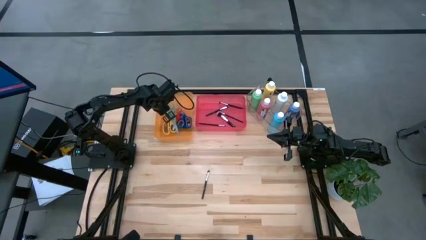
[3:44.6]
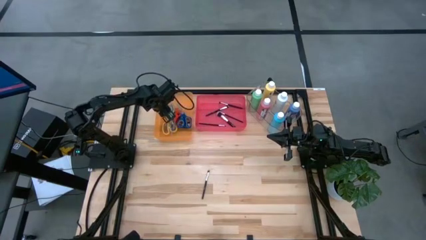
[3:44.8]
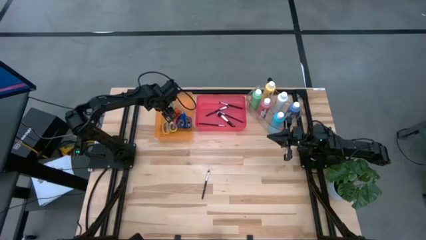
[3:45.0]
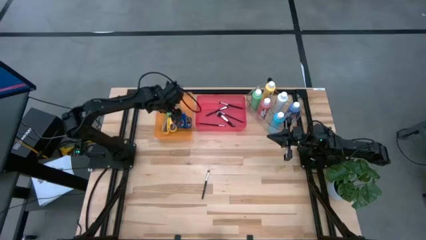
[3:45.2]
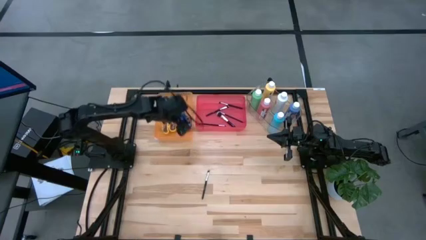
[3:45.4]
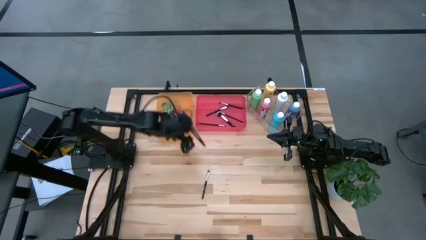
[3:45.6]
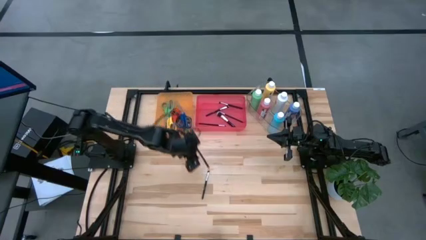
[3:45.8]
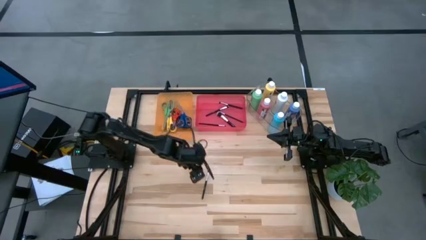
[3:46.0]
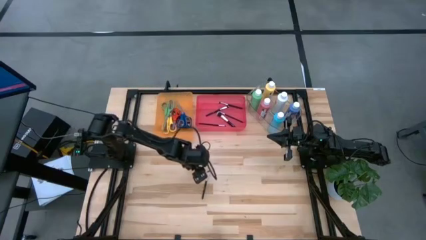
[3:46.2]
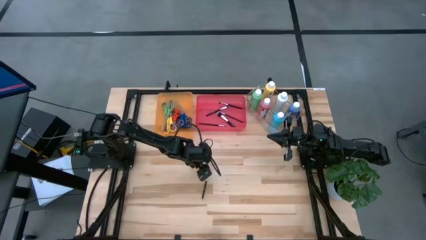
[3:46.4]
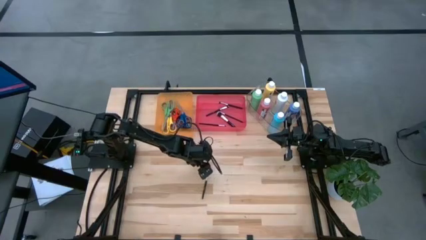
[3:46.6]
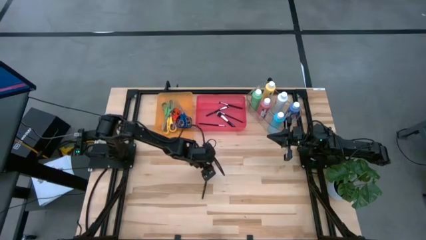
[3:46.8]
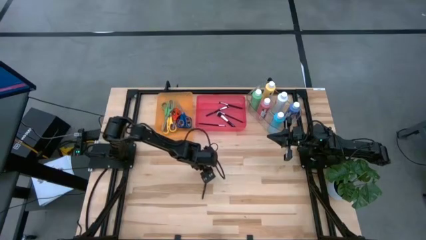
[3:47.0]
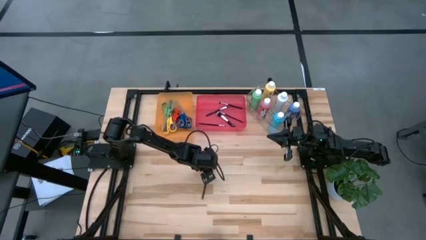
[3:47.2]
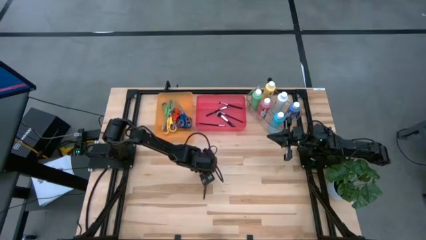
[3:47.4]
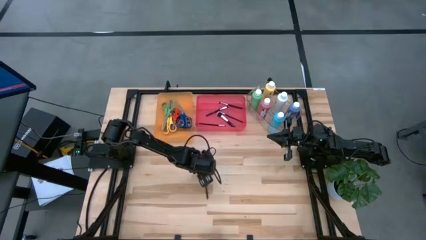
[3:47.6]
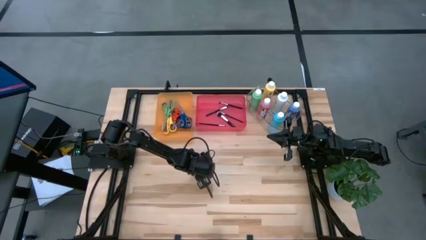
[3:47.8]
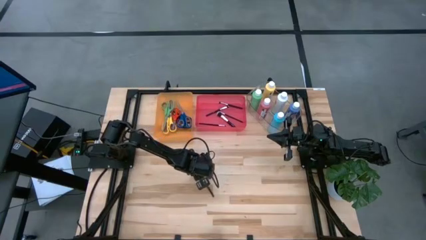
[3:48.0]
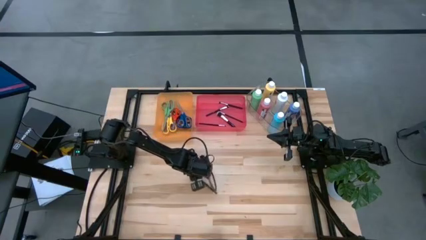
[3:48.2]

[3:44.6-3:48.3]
Task: Pick & Place Paint Supplies
Put the black paintbrush into the pink bin

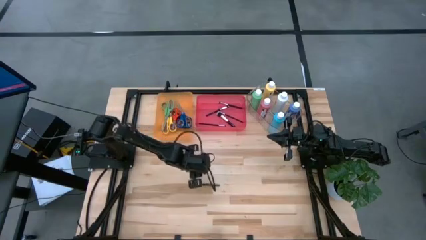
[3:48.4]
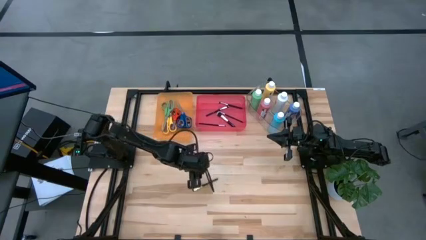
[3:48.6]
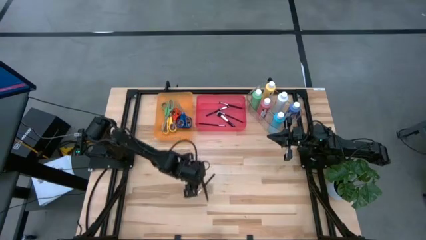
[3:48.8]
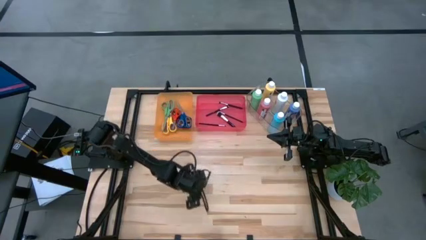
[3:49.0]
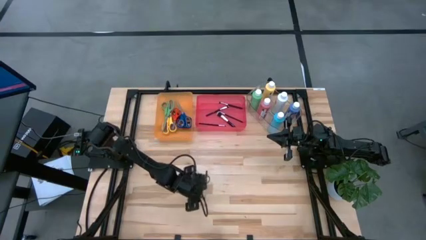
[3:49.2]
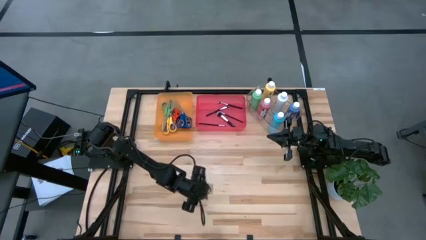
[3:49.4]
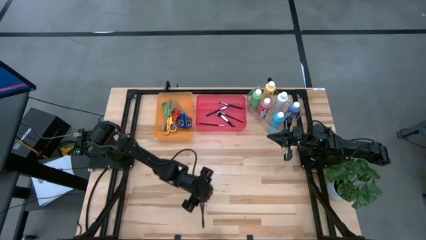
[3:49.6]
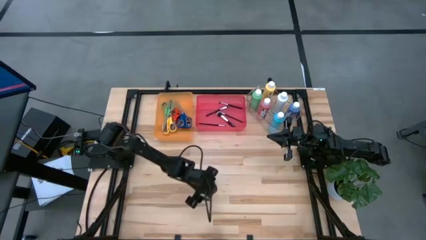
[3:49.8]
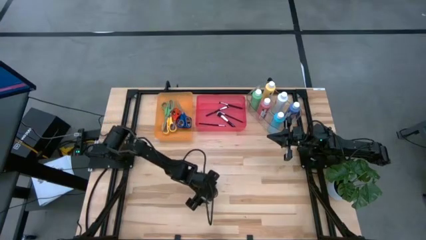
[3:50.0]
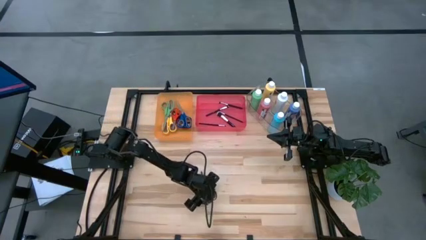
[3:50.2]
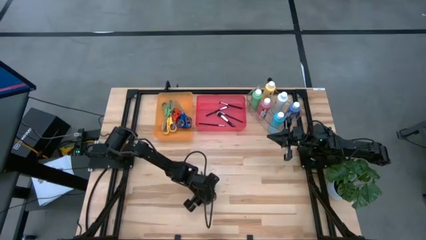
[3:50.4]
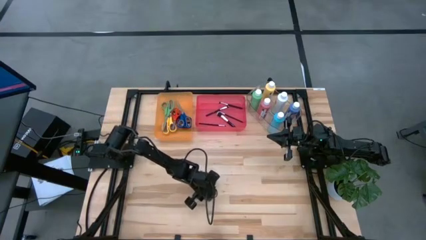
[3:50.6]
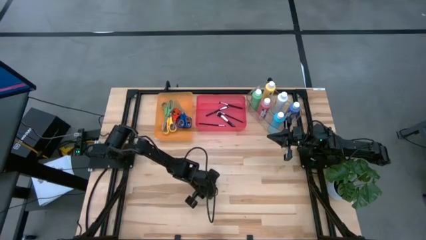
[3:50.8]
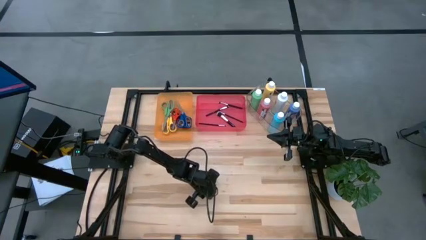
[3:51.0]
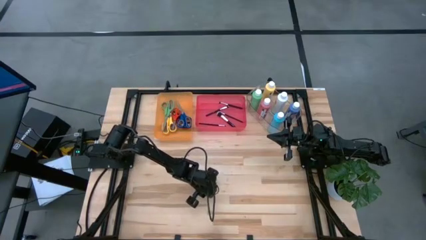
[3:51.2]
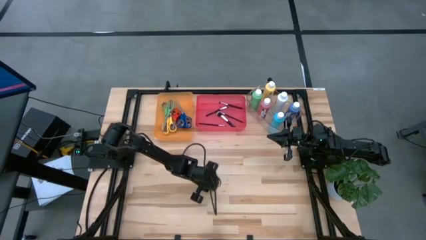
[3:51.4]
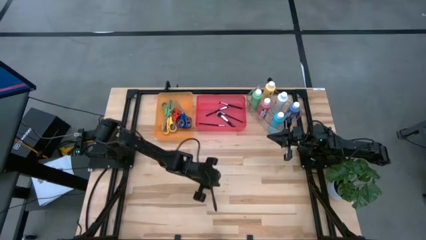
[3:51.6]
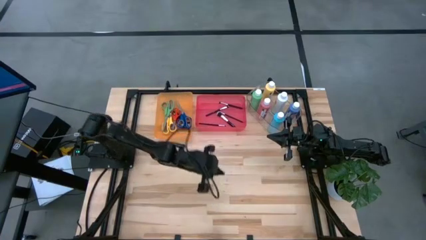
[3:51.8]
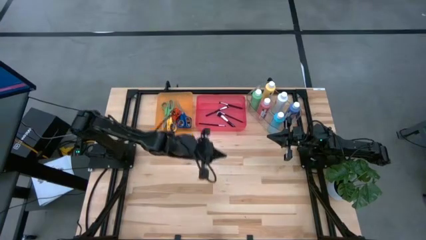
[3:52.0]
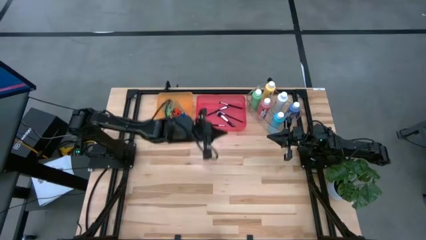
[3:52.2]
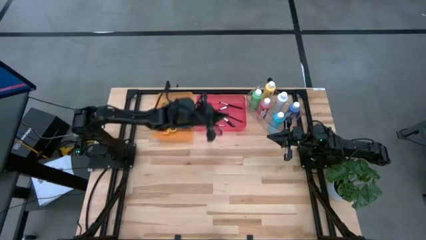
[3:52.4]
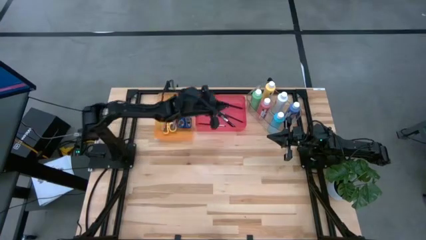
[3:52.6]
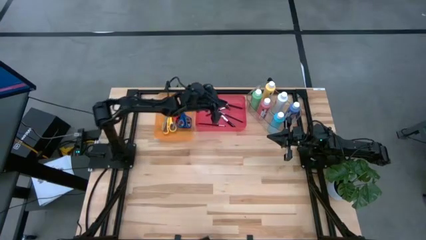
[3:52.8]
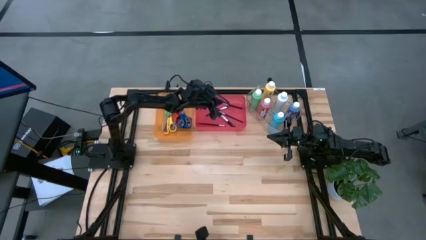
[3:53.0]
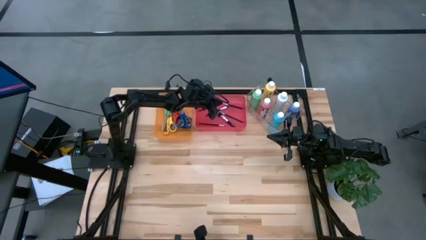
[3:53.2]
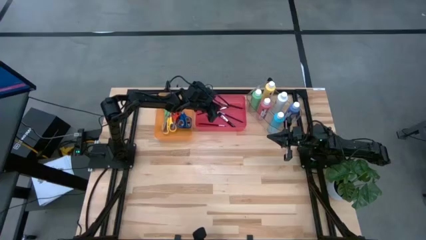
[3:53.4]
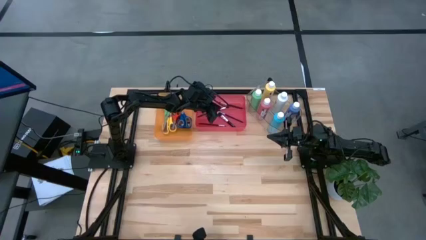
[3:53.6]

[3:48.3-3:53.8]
Put the black paintbrush into the pink bin

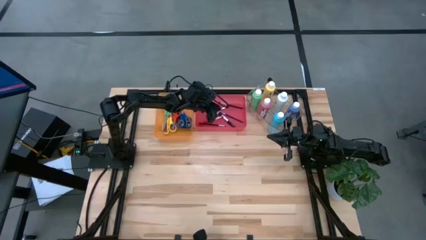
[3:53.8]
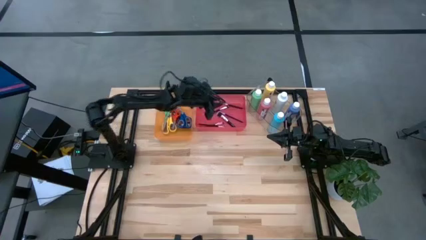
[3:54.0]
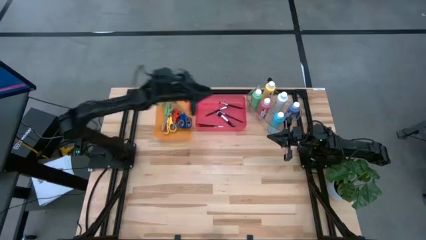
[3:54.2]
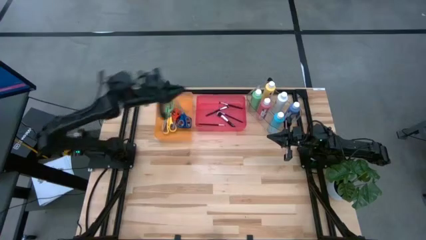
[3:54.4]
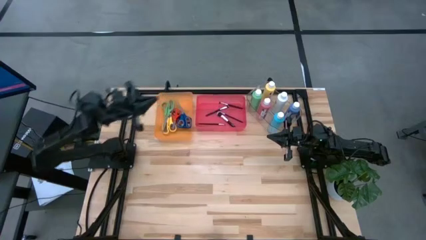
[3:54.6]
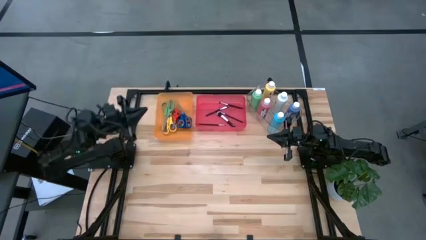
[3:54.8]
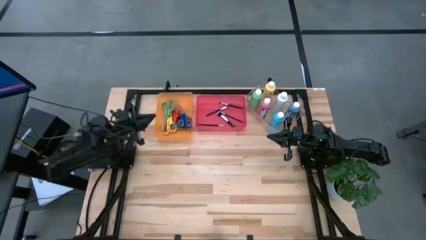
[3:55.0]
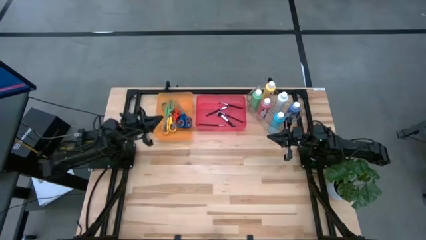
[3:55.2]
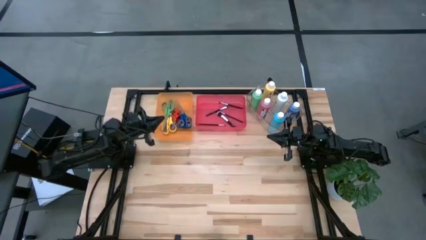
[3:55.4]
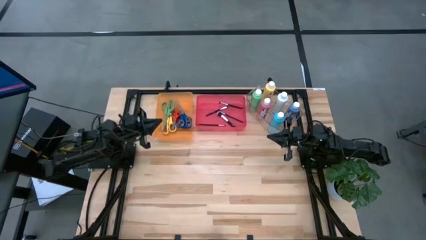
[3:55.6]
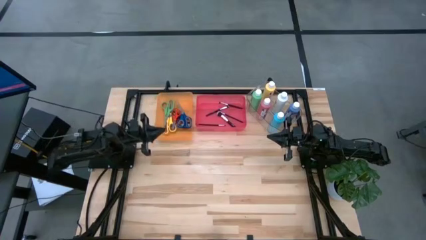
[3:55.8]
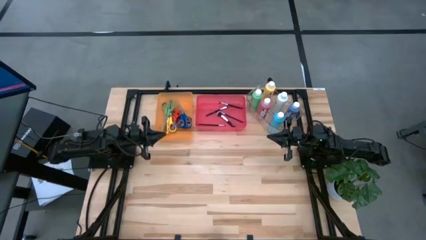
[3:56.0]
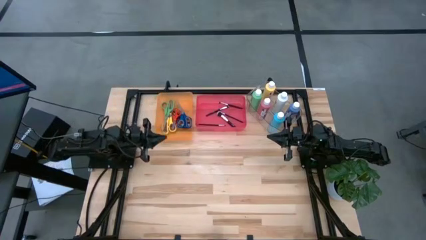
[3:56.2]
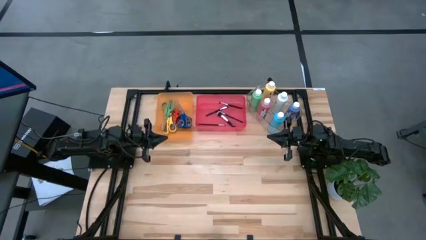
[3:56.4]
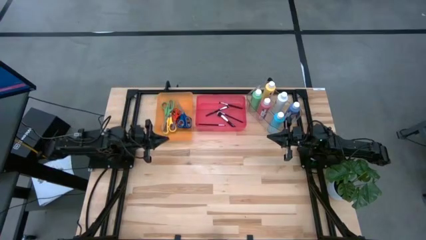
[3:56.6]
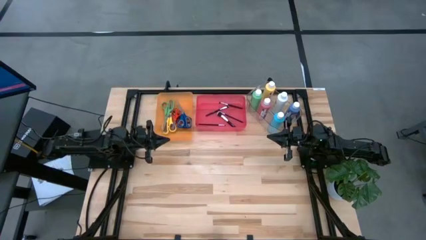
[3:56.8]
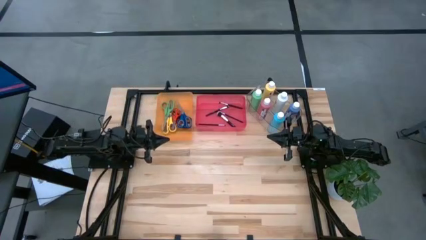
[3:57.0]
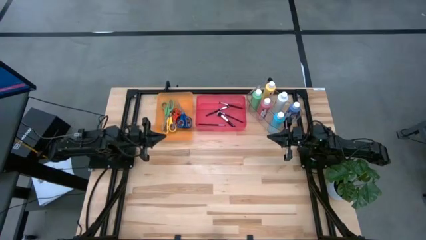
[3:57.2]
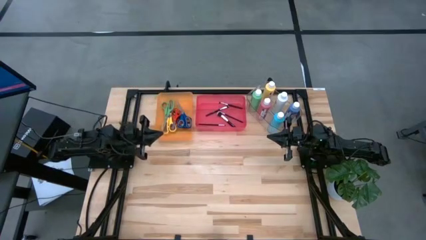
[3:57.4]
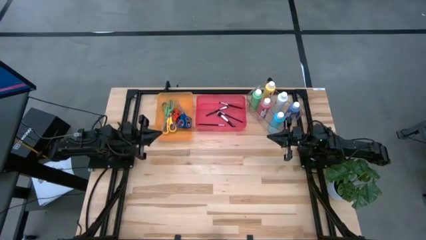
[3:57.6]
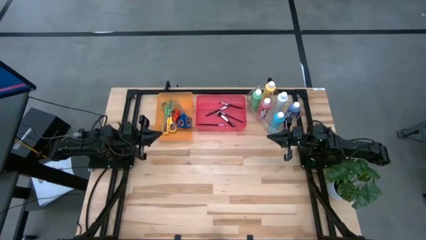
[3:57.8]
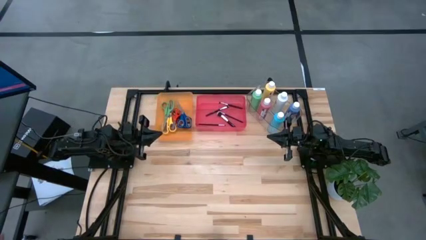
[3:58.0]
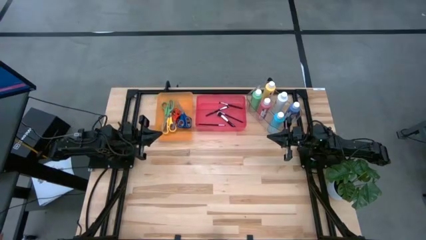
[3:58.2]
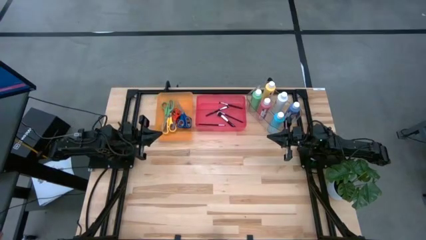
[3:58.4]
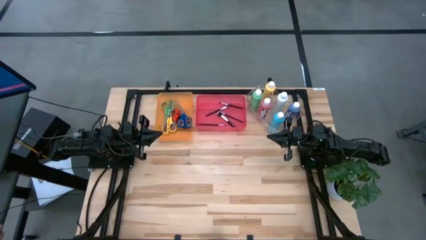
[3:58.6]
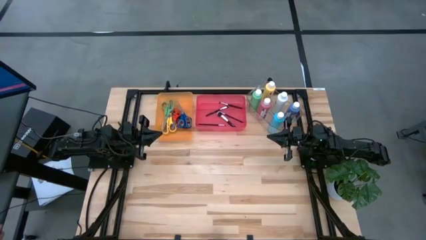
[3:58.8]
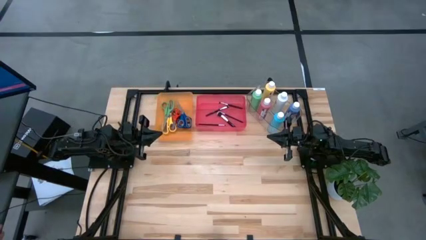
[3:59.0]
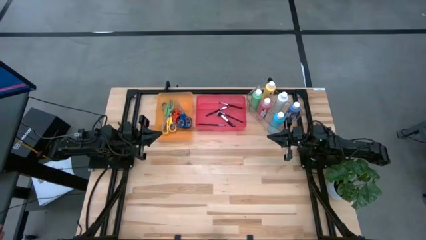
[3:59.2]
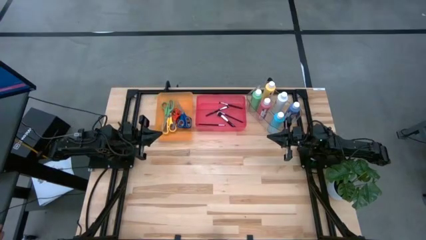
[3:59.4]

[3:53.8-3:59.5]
Return to Home Position

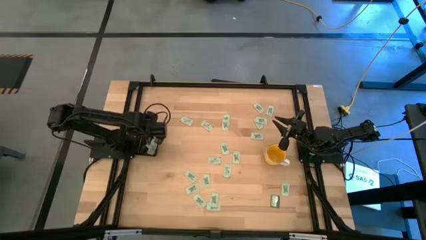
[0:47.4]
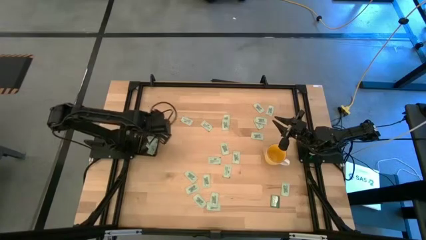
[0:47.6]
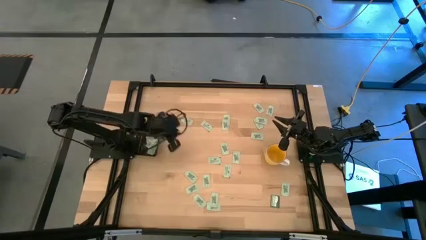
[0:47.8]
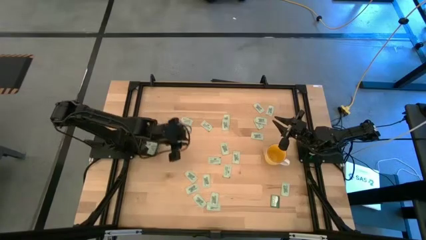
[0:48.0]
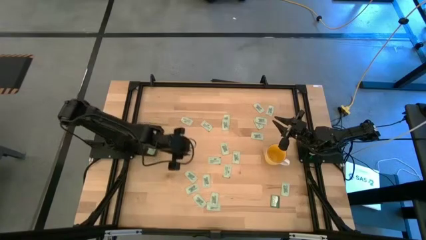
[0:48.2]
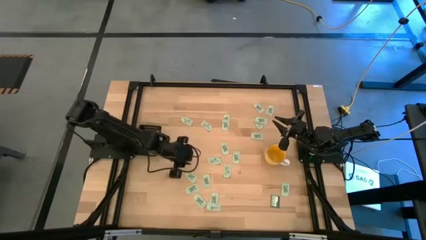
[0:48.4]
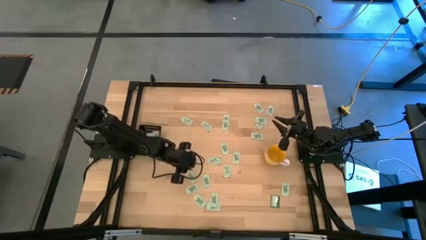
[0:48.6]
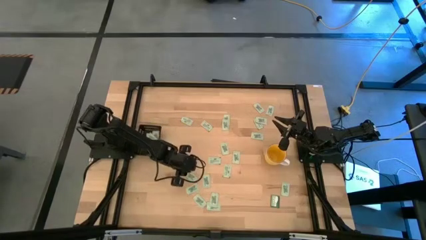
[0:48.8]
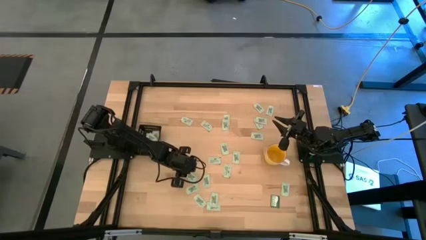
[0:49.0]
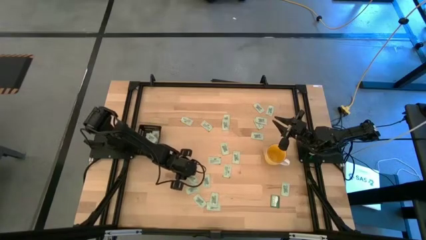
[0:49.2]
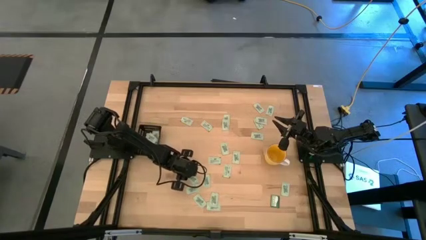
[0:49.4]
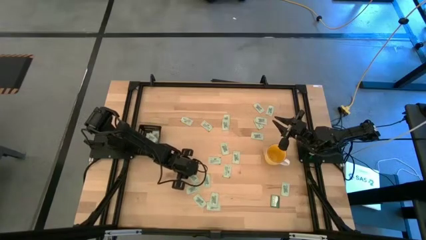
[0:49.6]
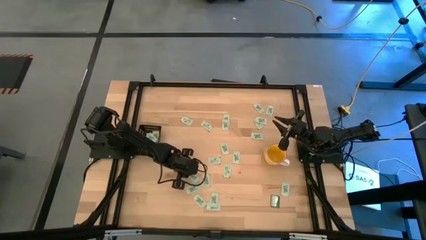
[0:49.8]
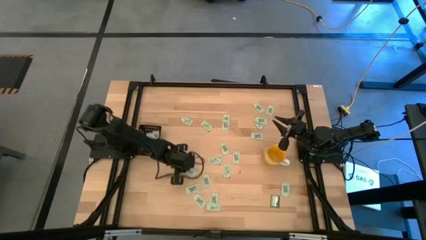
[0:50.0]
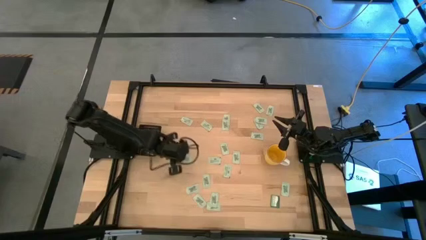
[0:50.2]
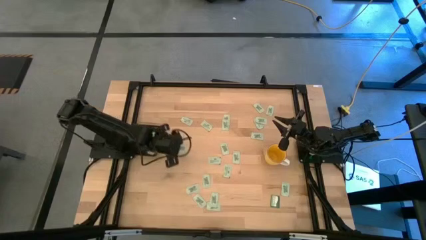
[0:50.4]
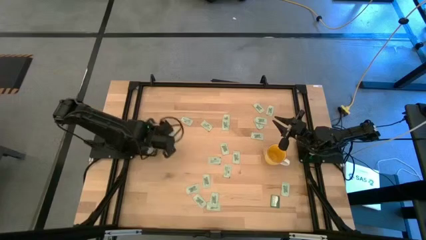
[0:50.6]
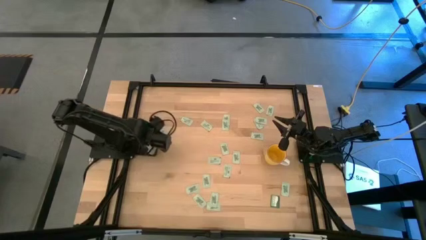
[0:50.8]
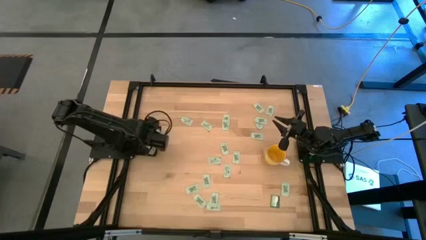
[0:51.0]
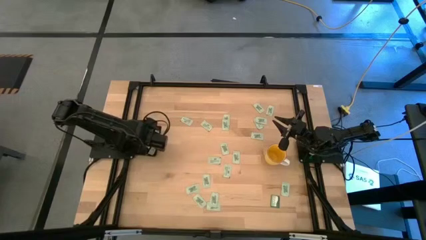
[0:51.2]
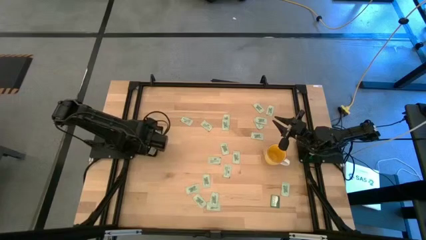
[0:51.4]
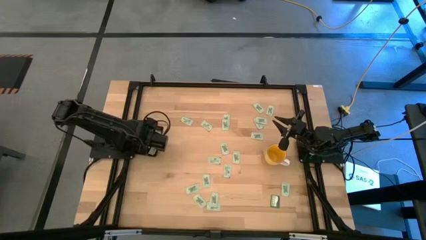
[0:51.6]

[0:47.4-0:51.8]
Task: Pick and place Stevia / Truvia into bins
Put the stevia packet into the black bin
